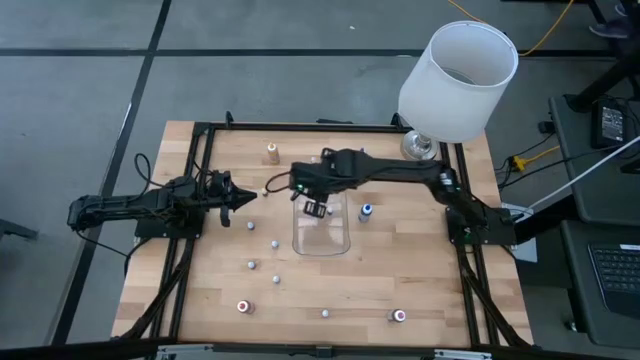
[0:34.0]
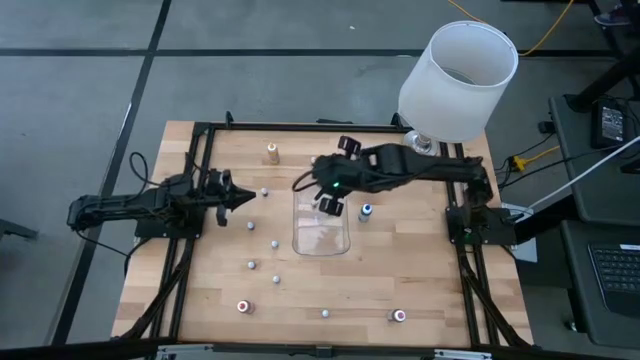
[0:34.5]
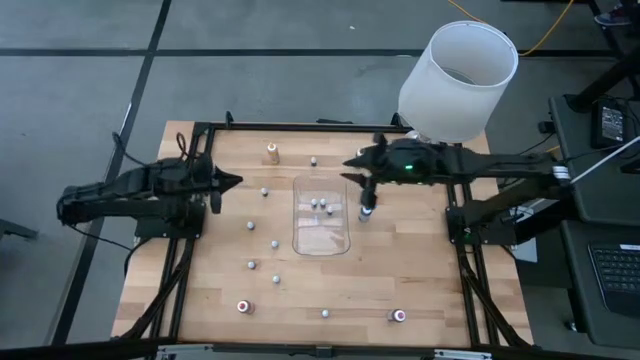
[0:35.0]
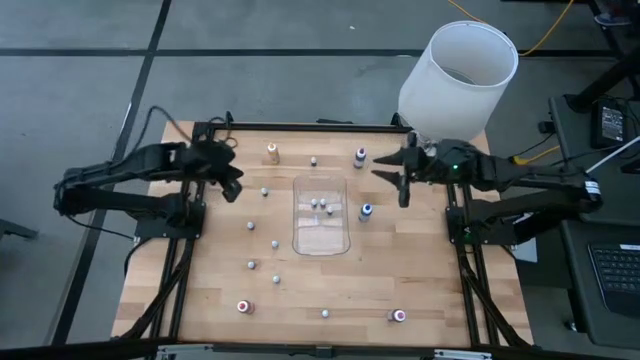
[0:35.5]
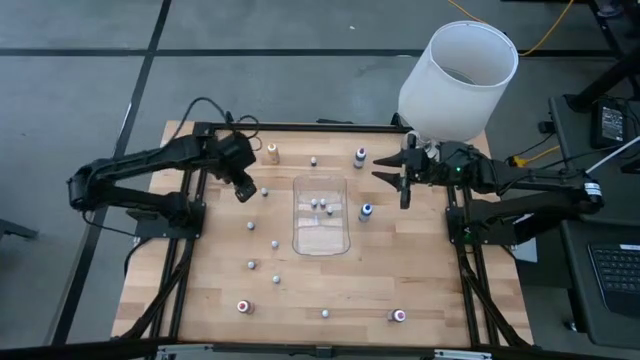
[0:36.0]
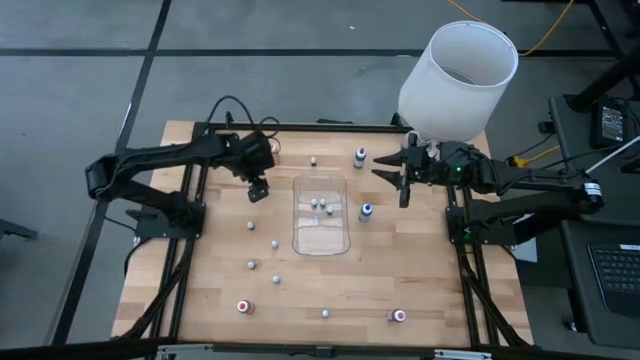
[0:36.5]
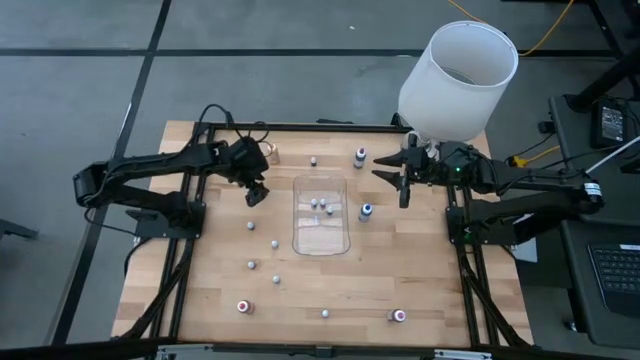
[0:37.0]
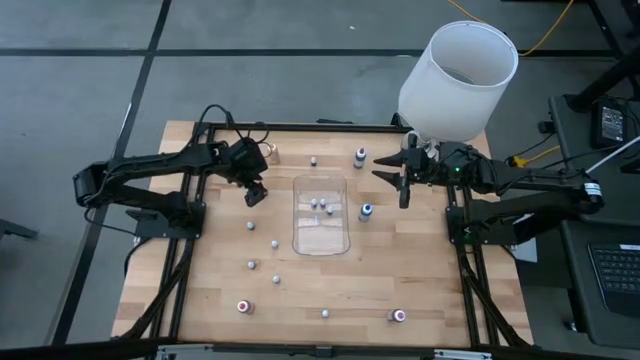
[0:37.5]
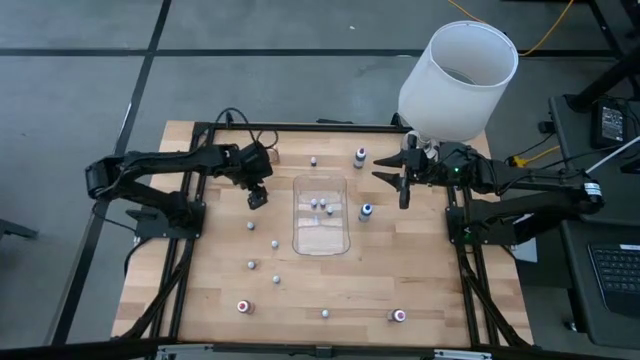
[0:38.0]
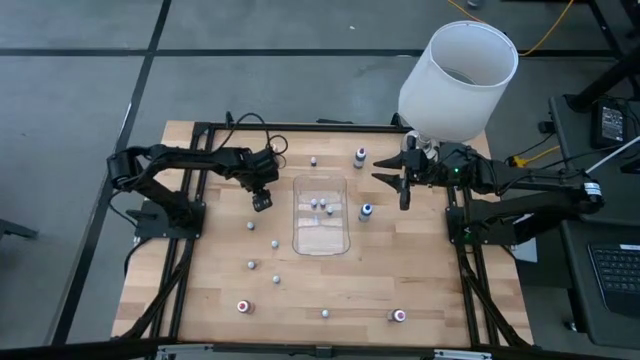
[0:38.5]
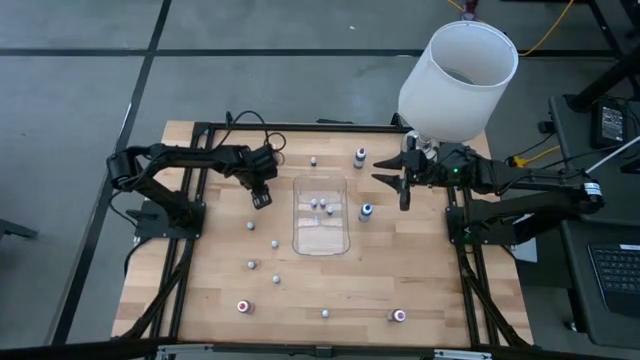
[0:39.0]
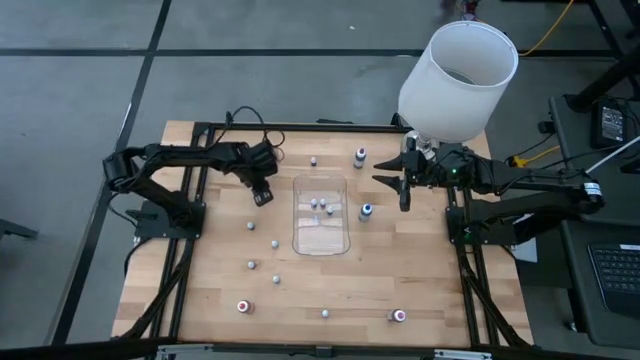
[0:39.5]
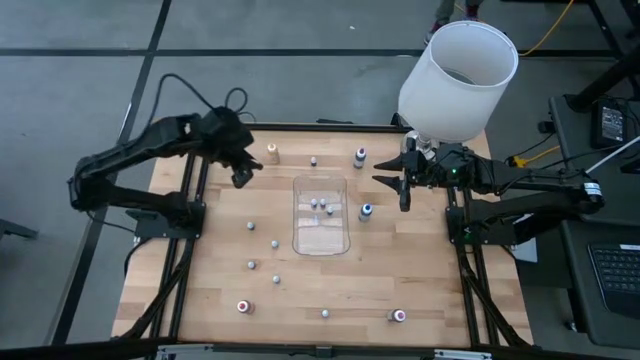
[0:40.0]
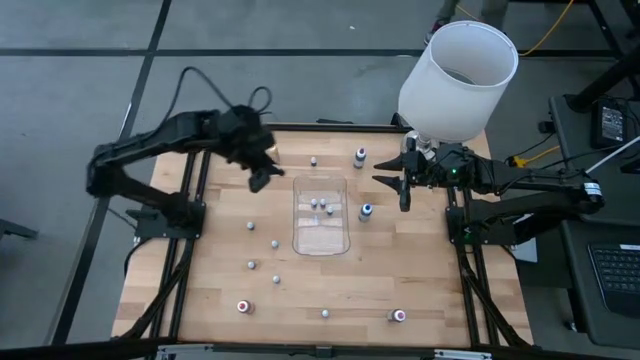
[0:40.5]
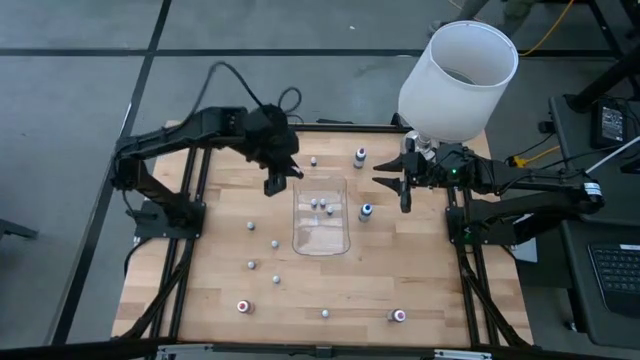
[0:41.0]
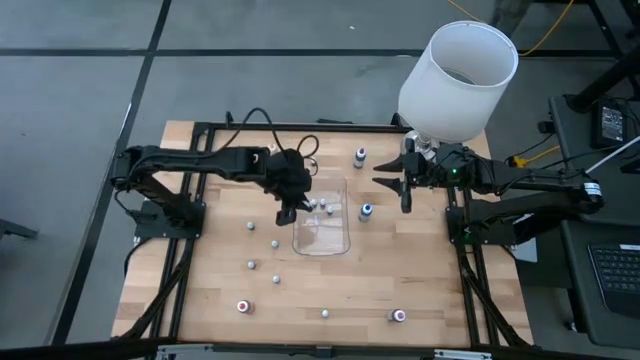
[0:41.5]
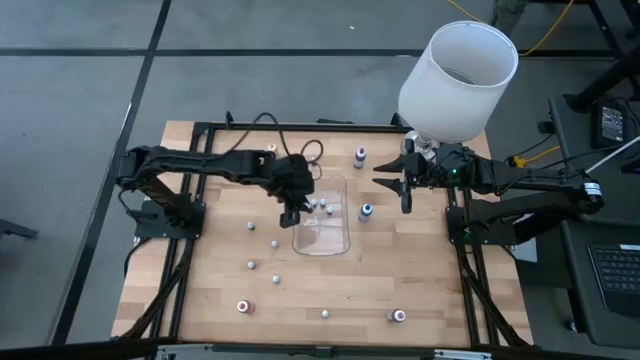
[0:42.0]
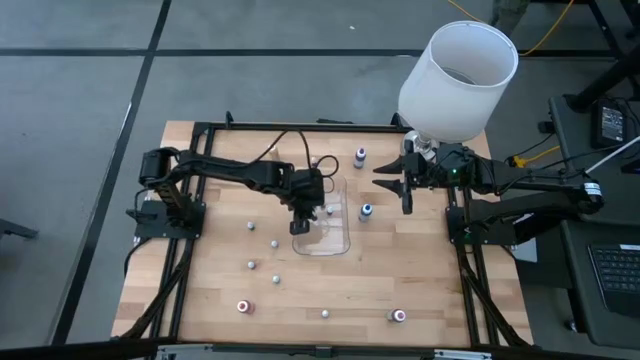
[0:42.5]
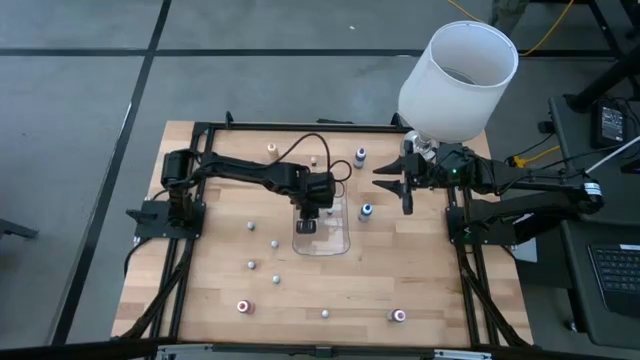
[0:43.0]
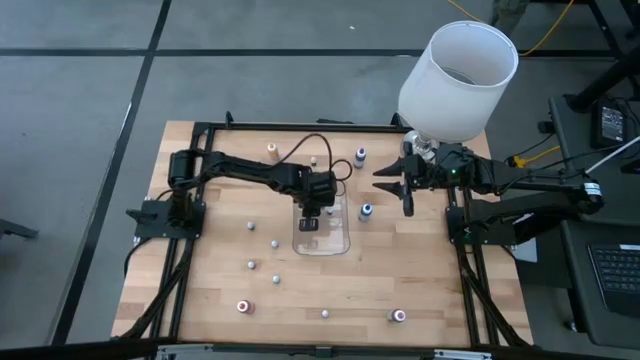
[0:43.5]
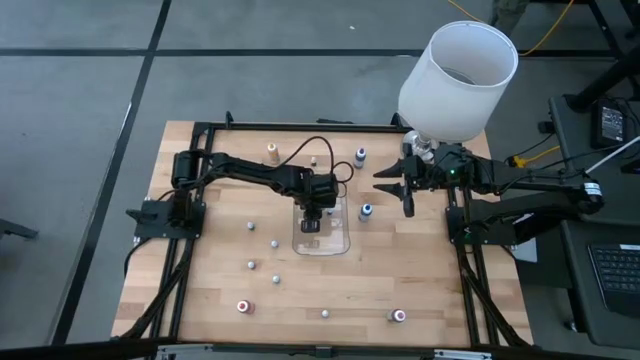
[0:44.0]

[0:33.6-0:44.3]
Task: Pick & Place food coloring
Put the small blue food coloring into the transparent bin

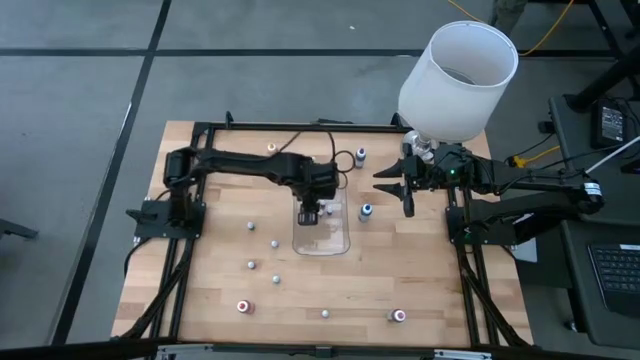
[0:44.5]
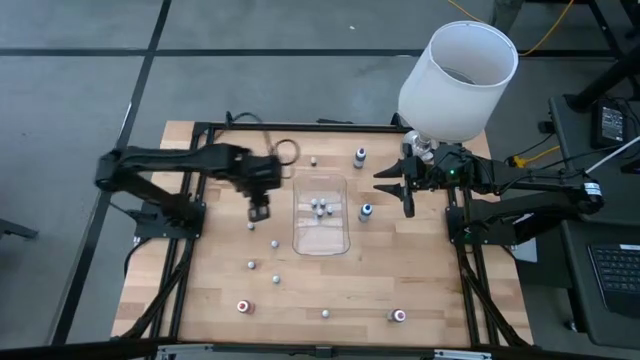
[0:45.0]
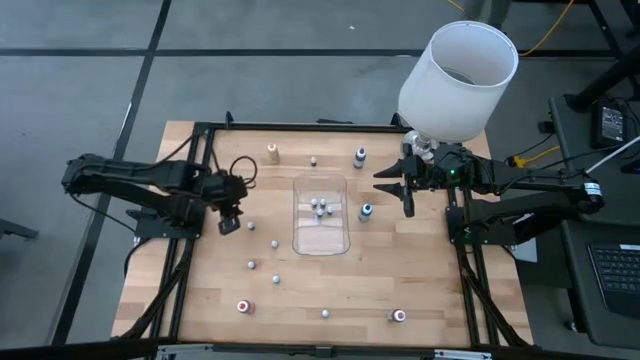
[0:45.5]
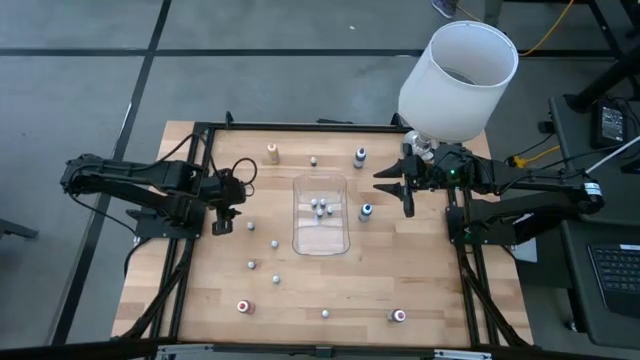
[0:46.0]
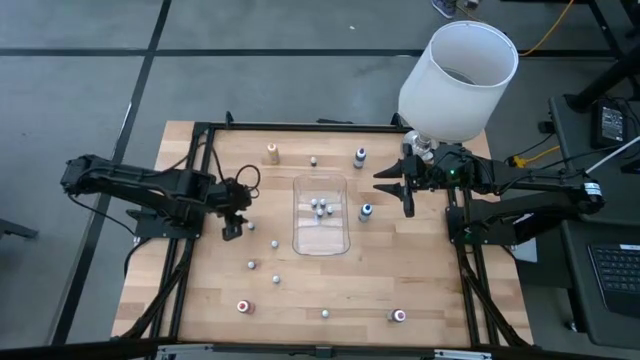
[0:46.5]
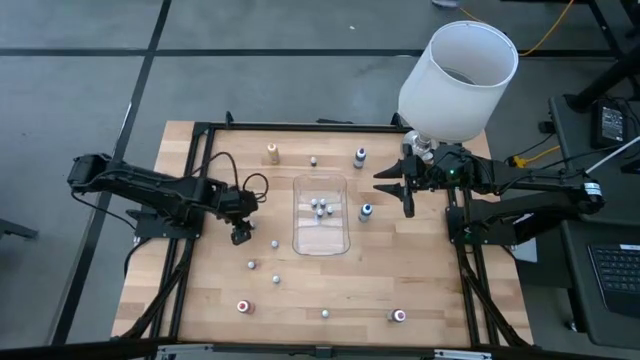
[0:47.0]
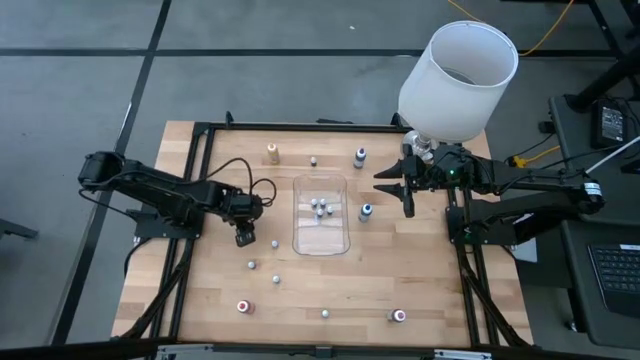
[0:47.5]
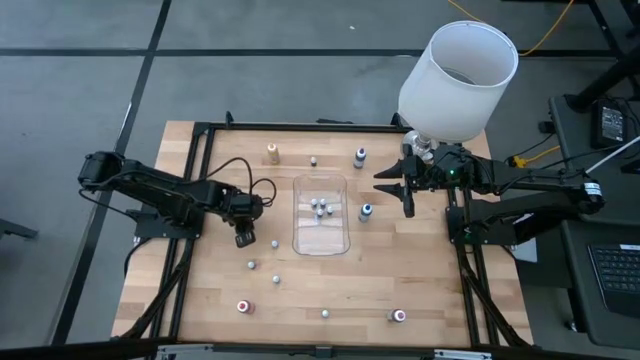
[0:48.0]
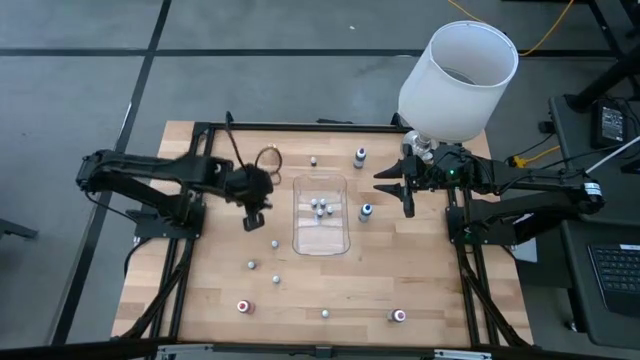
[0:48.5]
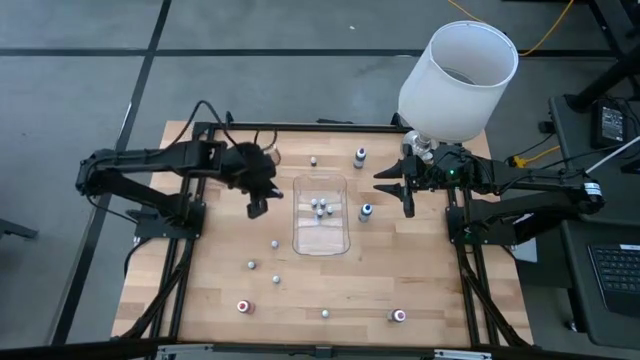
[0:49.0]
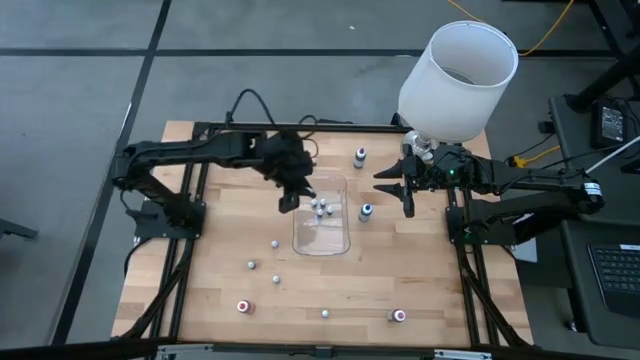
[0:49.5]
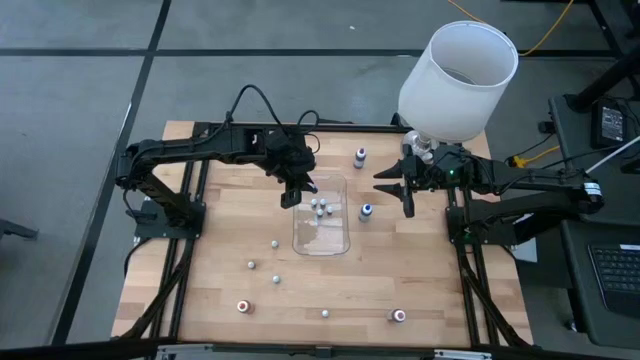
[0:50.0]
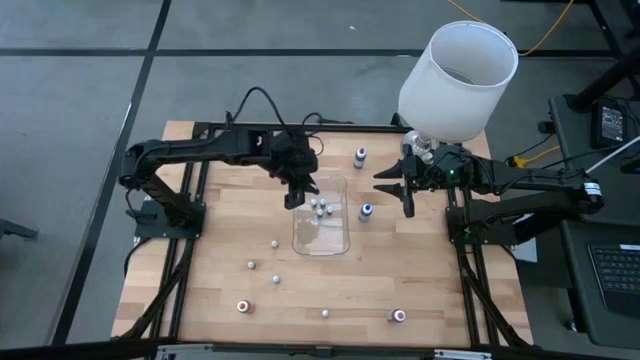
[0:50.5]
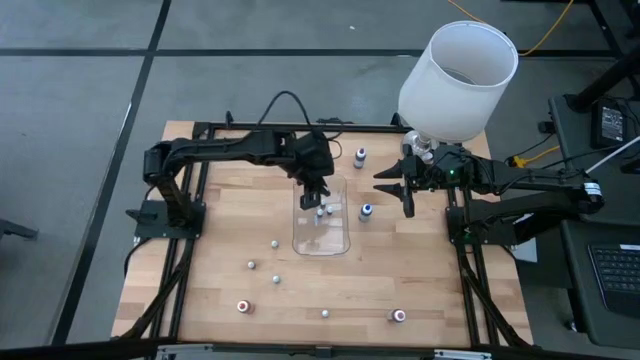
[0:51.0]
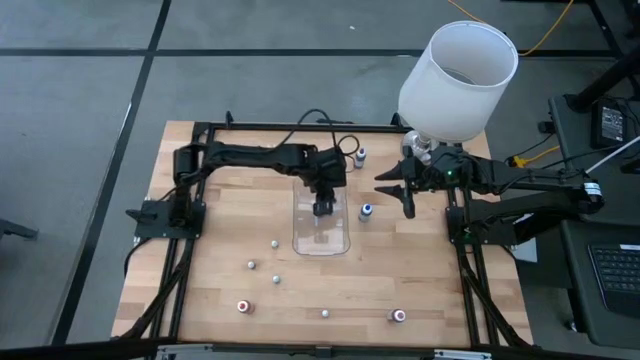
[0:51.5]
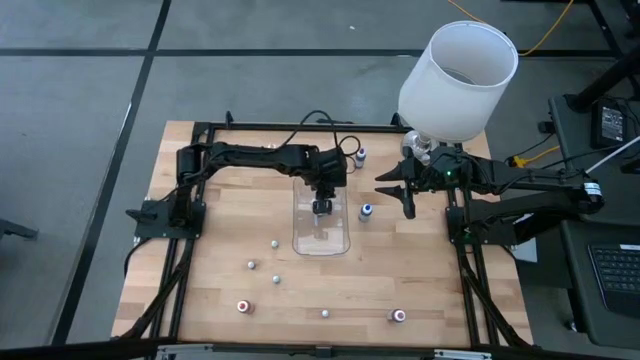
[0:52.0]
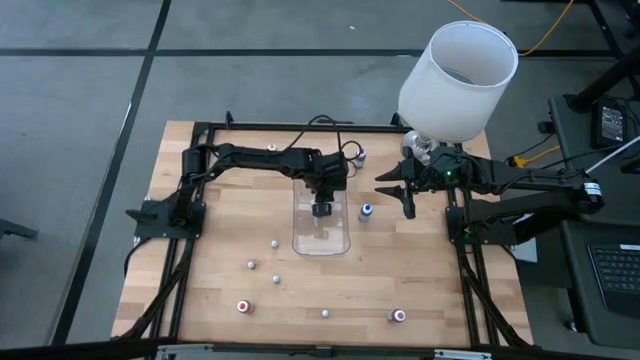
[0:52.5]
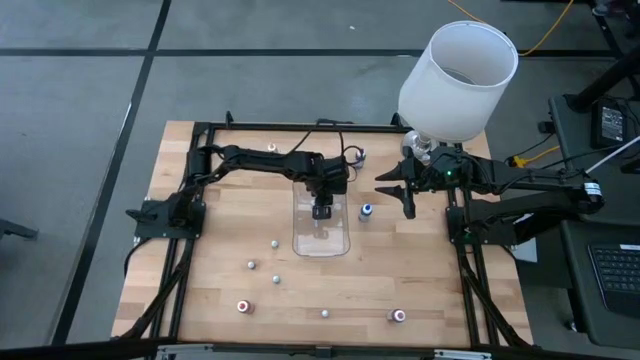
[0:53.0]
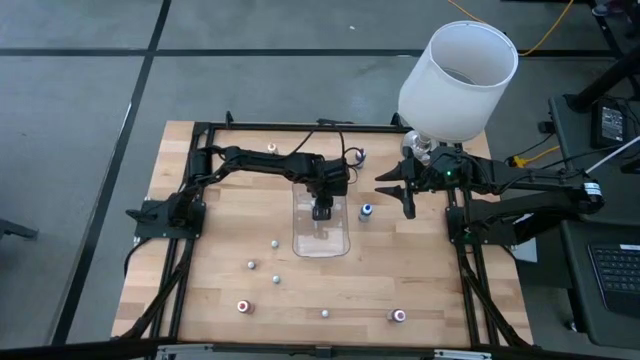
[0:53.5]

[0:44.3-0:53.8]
Put the small blue food coloring into the transparent bin

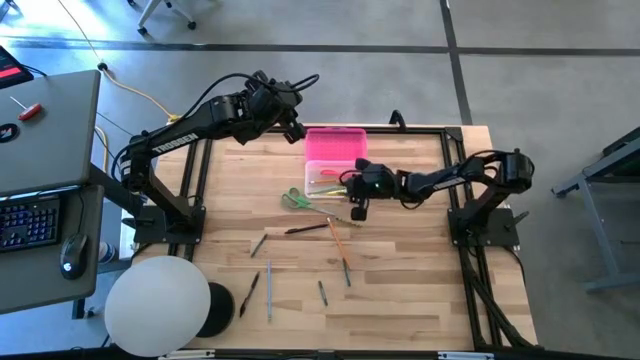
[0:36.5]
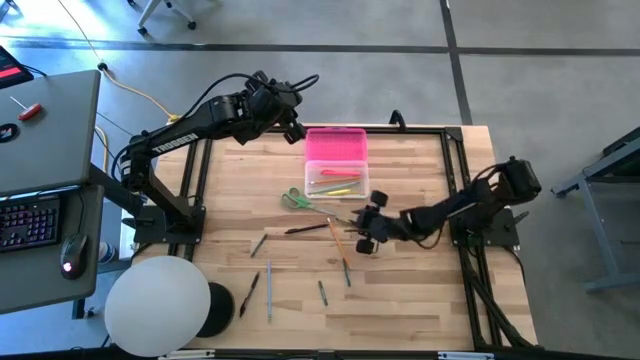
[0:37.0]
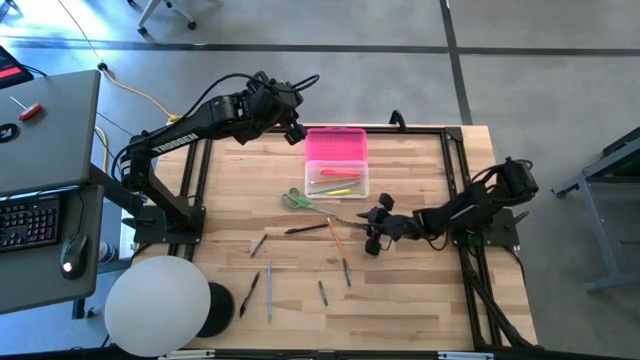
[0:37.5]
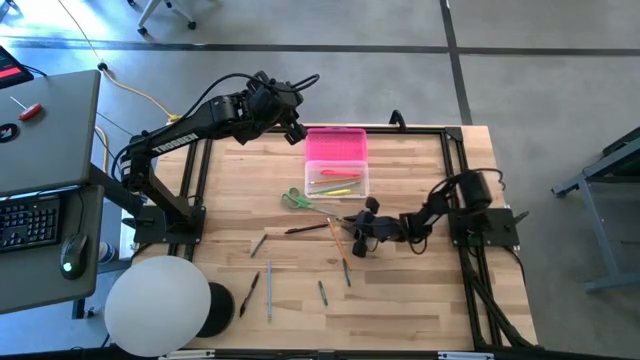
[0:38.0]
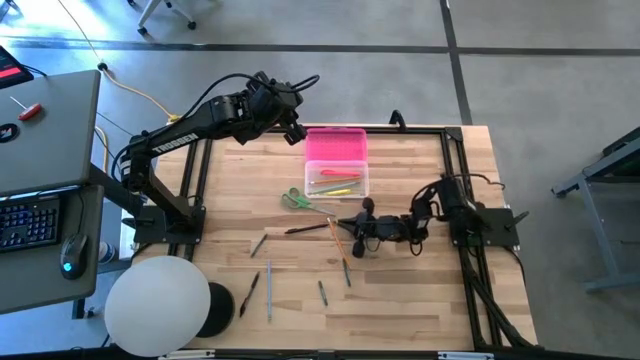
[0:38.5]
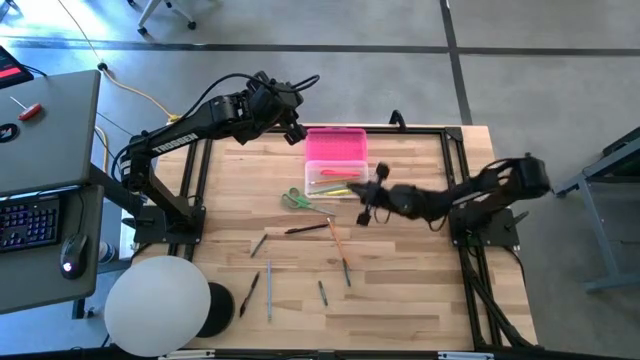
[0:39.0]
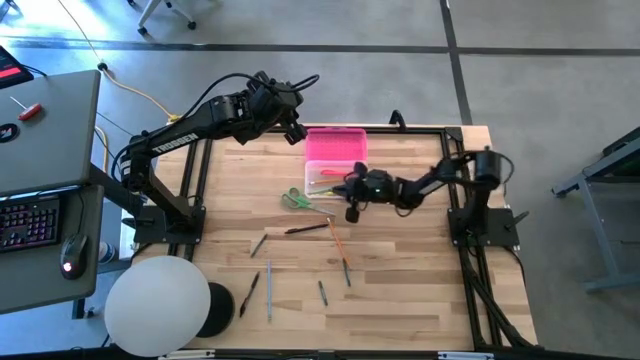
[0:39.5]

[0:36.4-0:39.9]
Task: Pick & place school supplies into a supply box
Put the green crayon into the supply box
